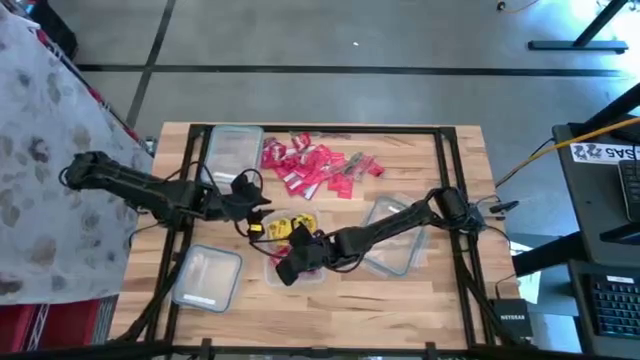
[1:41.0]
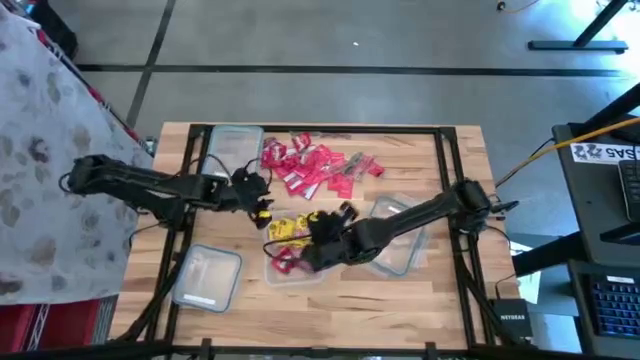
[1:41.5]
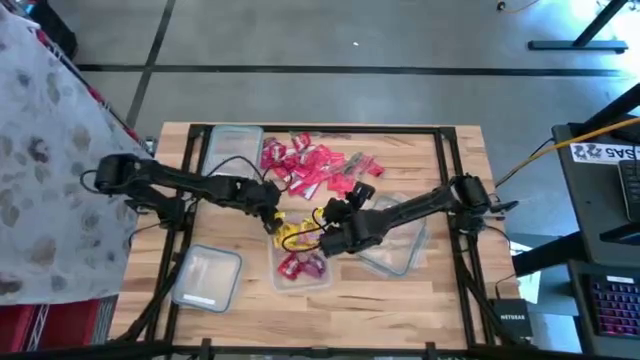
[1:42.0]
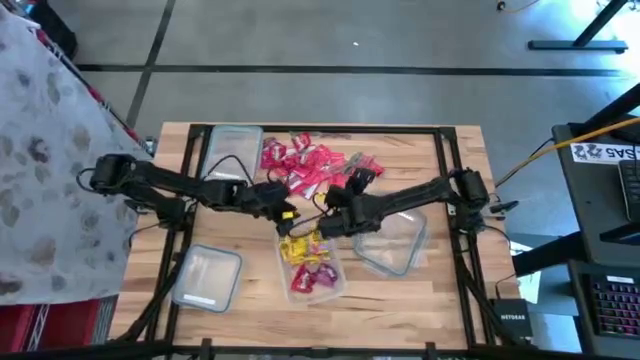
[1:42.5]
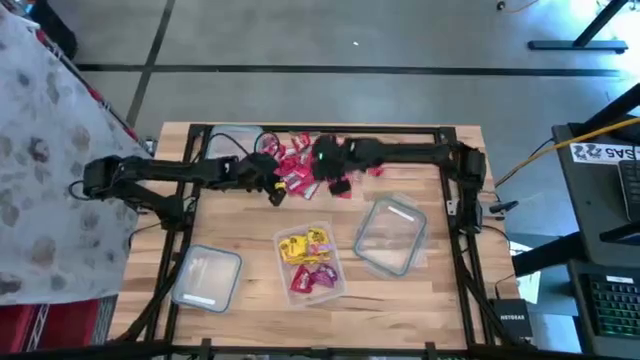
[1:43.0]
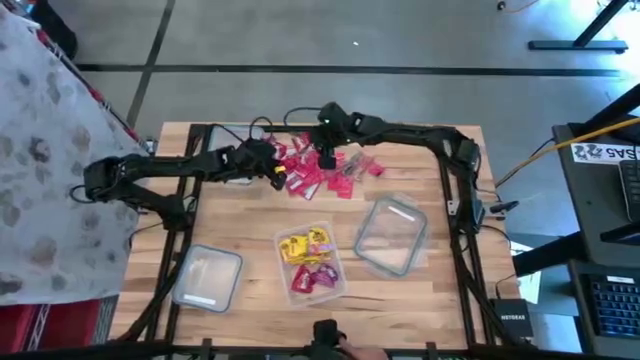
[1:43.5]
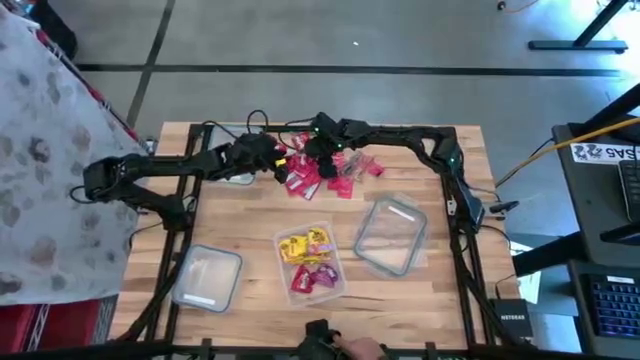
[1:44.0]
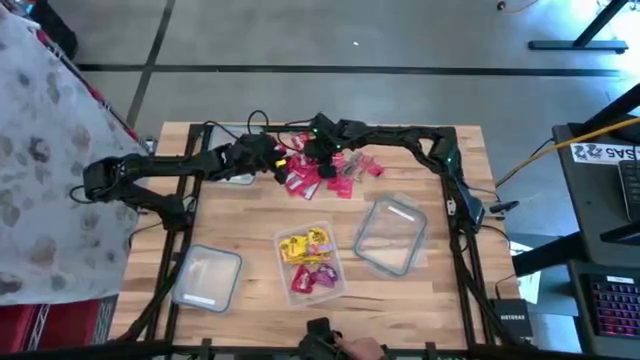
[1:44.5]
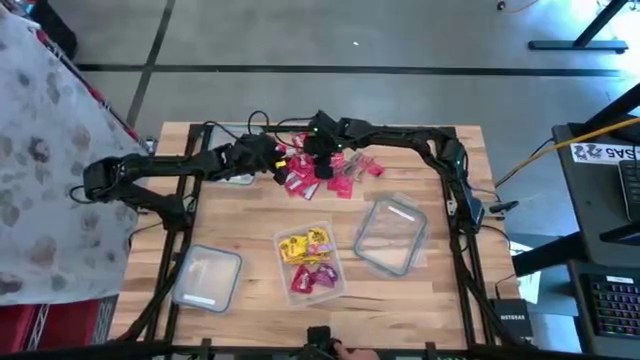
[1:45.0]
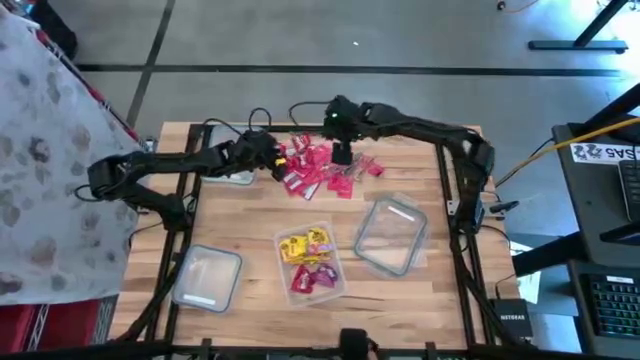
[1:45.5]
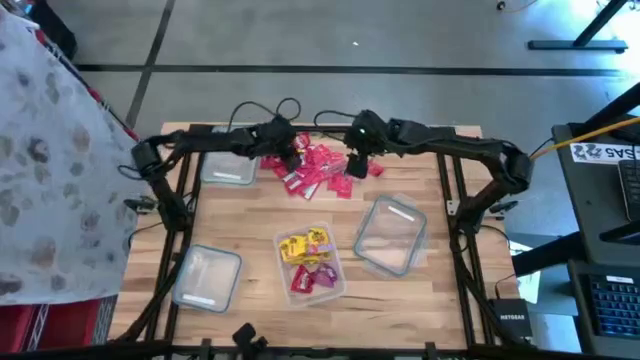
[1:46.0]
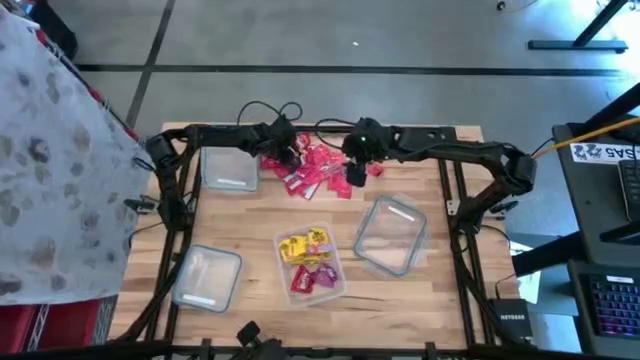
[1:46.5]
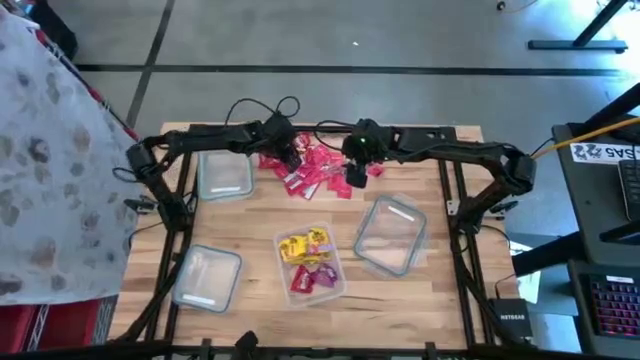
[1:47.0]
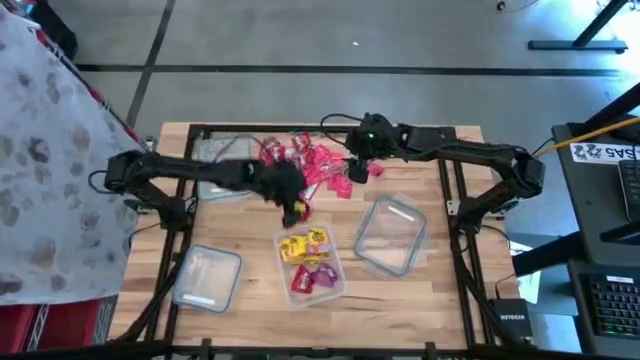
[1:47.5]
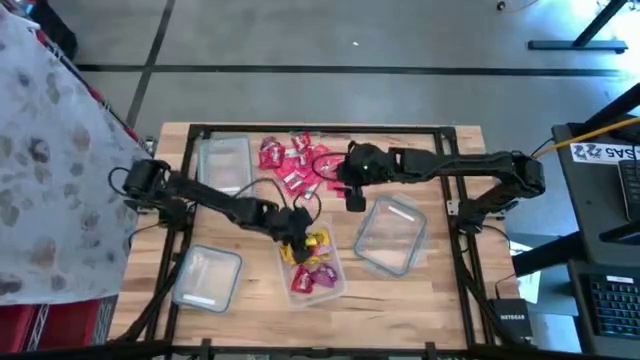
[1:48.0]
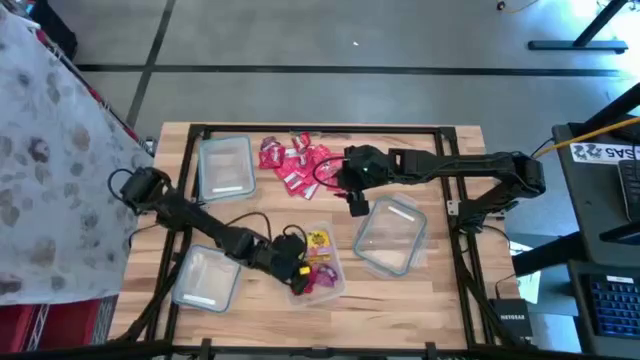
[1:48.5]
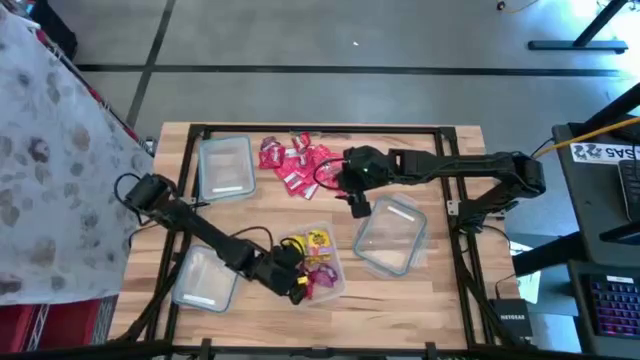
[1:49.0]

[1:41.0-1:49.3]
Task: Sort candy
Put the red candy into the right transparent bin

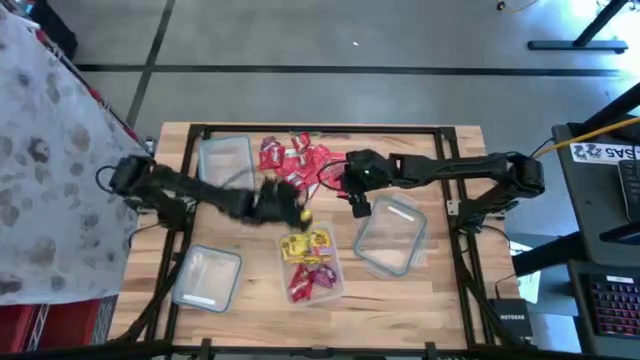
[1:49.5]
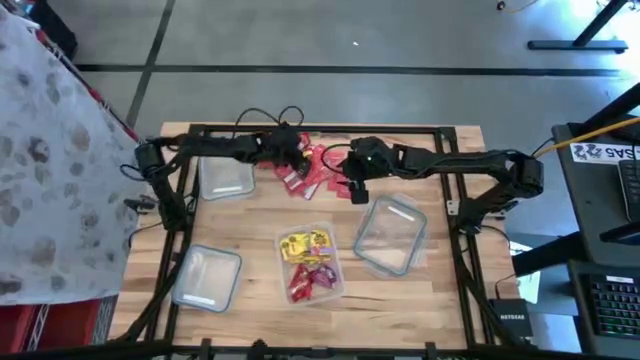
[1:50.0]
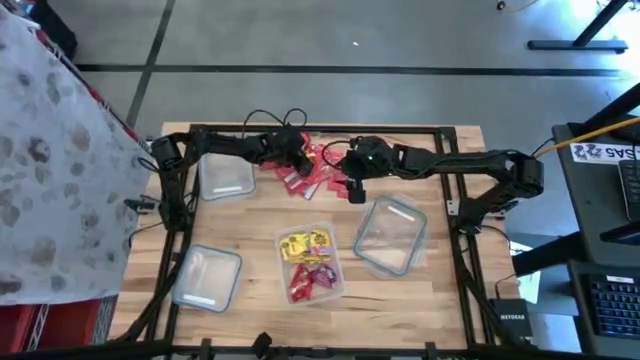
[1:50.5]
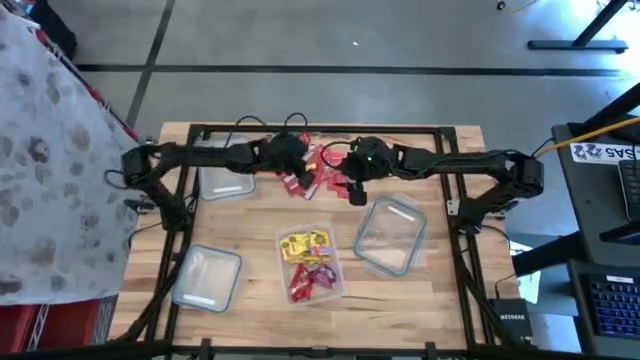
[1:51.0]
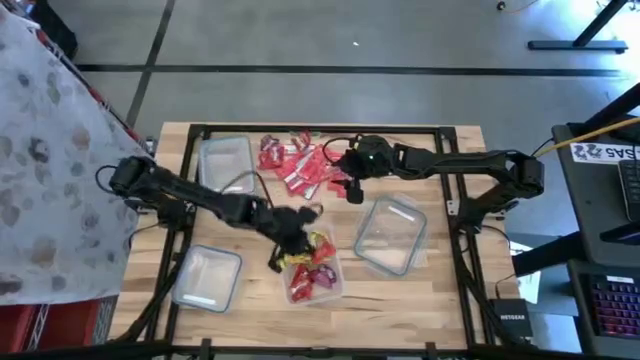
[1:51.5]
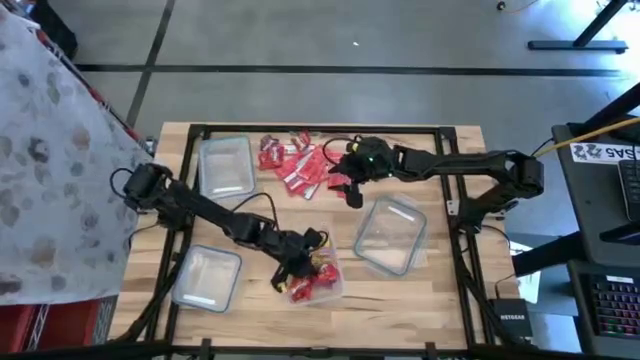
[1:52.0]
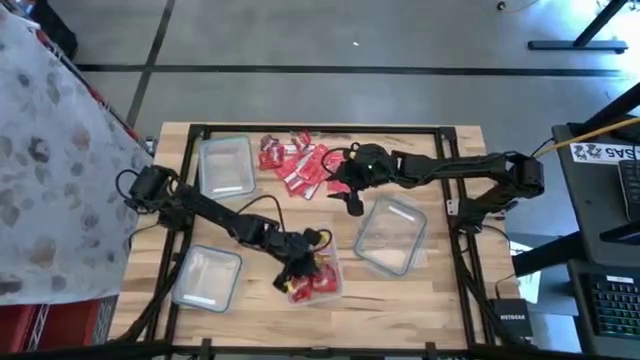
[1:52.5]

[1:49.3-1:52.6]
Put the red candy into the right transparent bin

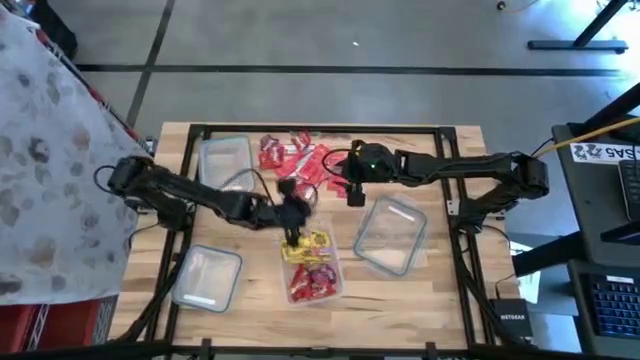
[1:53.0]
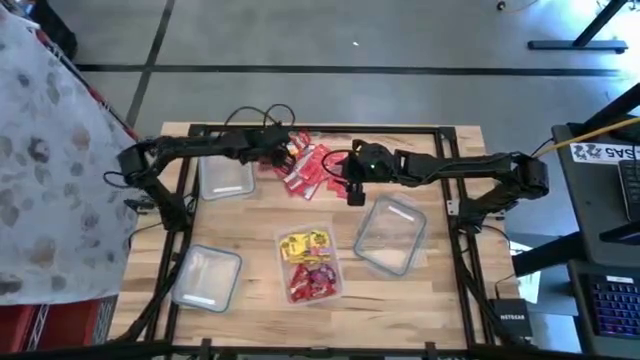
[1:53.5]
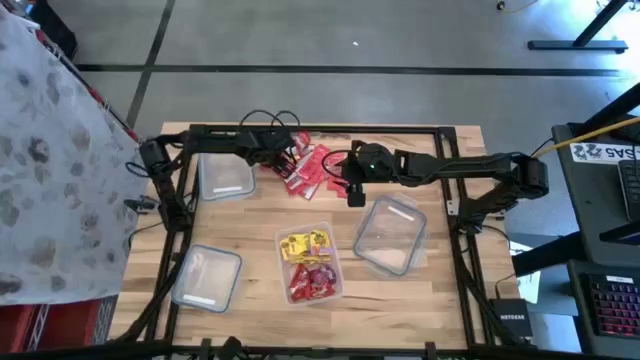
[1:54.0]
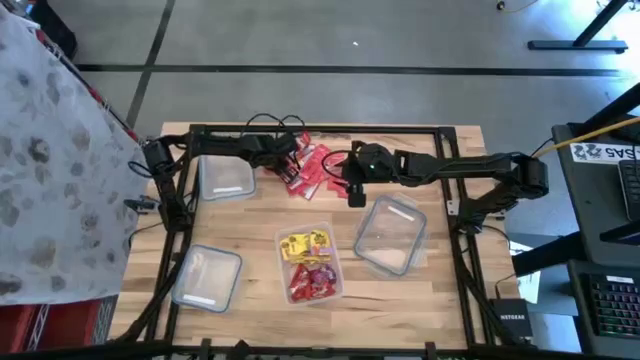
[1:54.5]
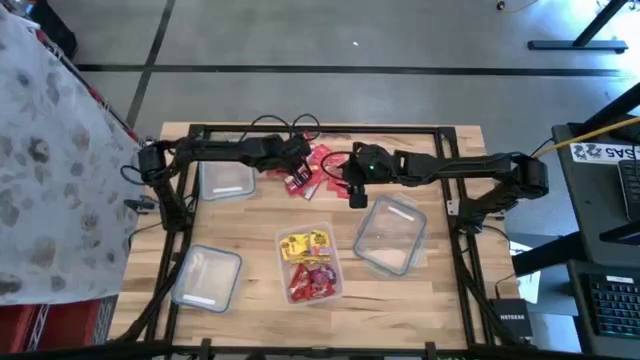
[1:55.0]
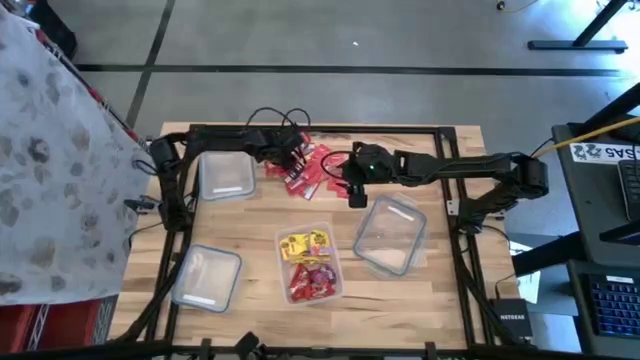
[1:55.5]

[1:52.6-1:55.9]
Put the red candy into the right transparent bin

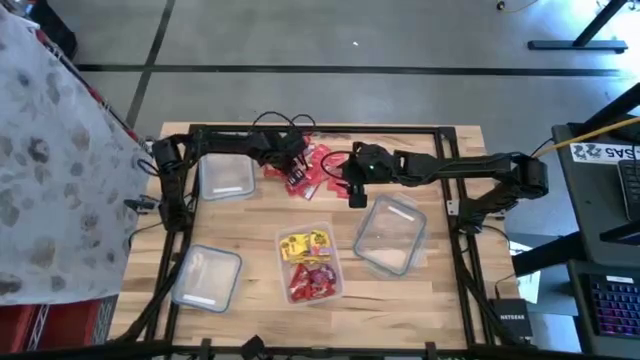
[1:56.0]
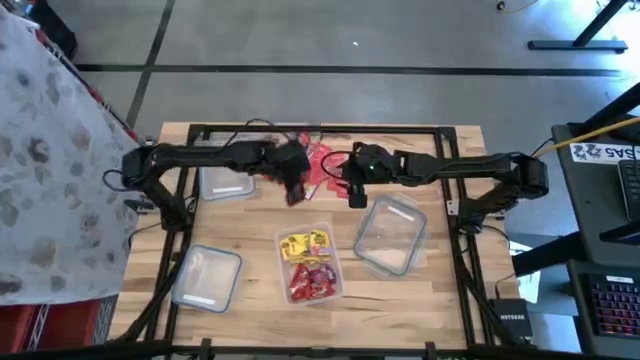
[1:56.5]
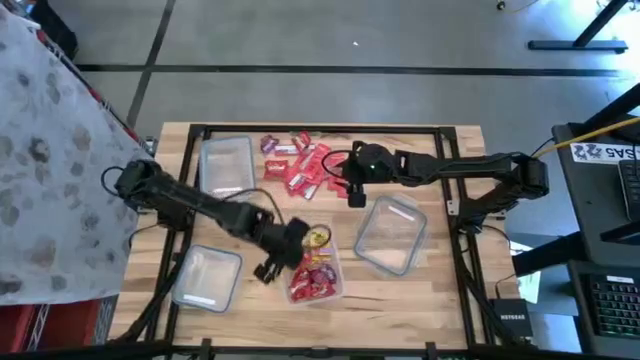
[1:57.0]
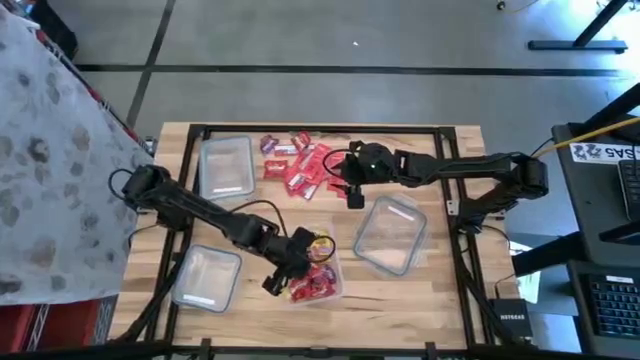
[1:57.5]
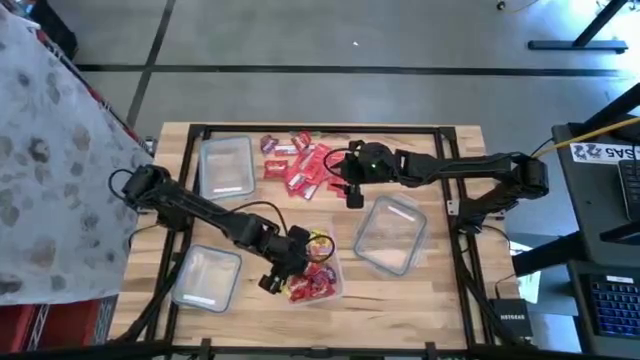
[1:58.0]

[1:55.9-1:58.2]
Put the red candy into the right transparent bin

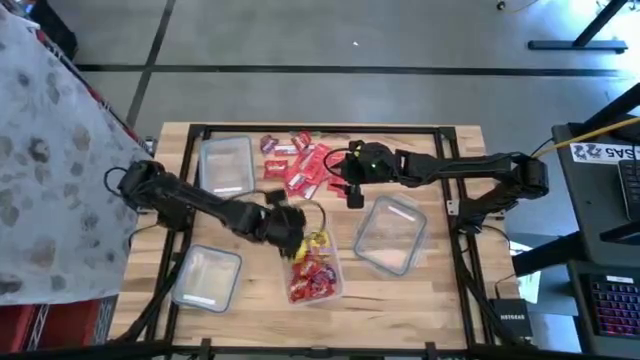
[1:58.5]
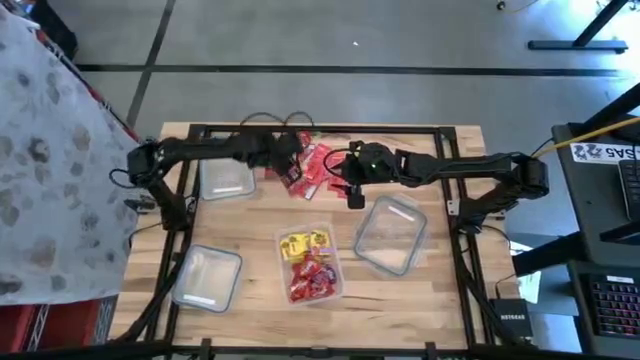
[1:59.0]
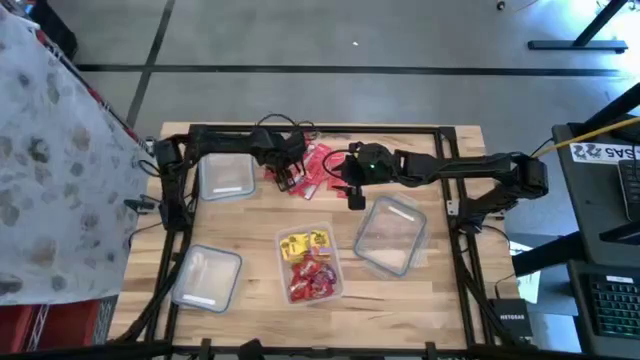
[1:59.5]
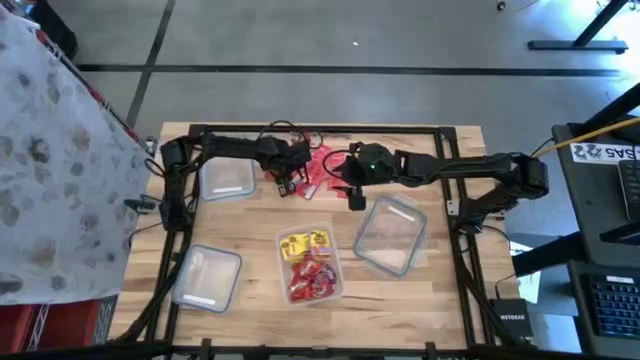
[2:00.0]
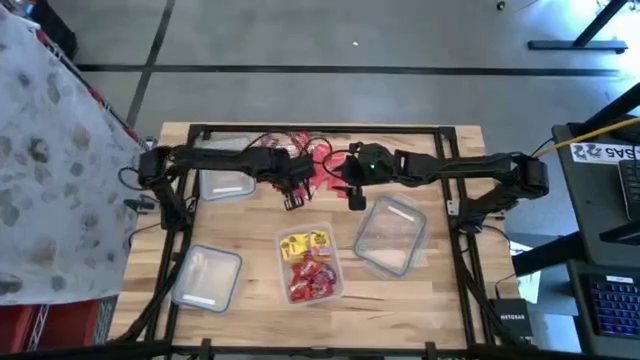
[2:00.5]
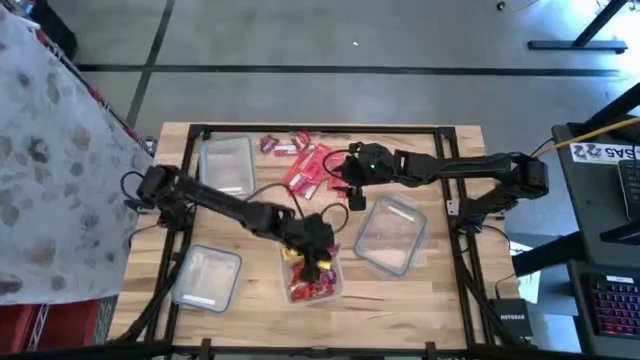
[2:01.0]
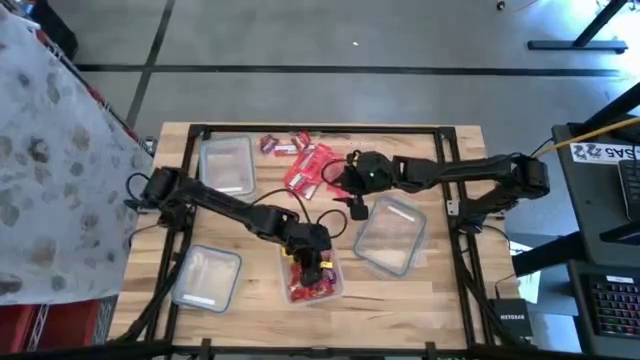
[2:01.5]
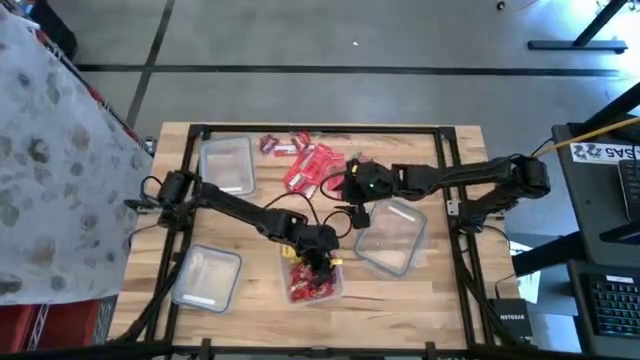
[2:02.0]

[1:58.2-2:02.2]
Put the red candy into the right transparent bin
